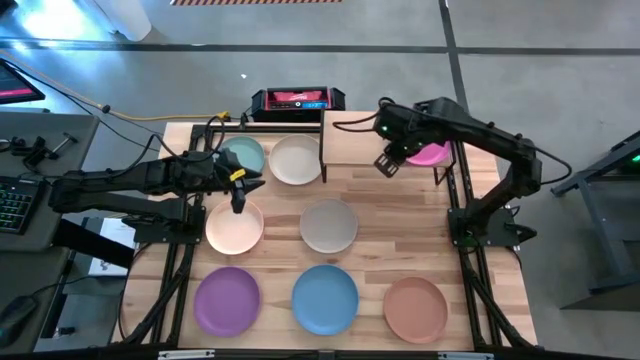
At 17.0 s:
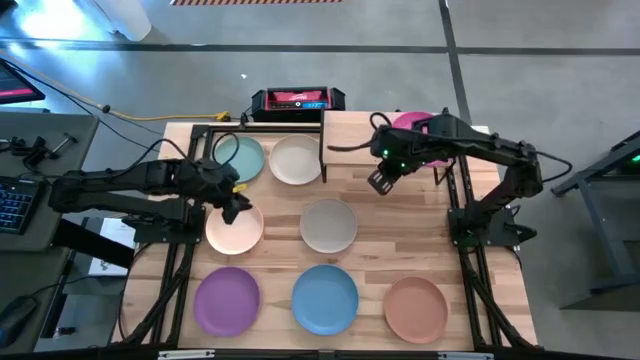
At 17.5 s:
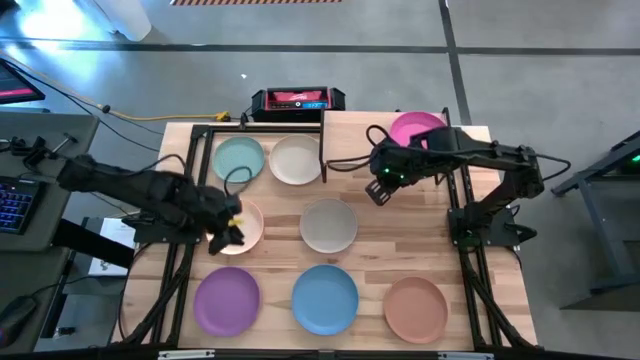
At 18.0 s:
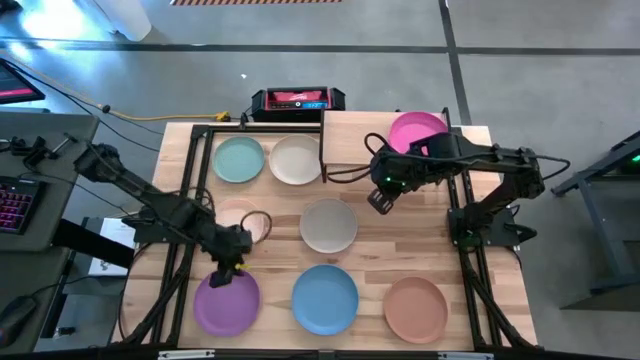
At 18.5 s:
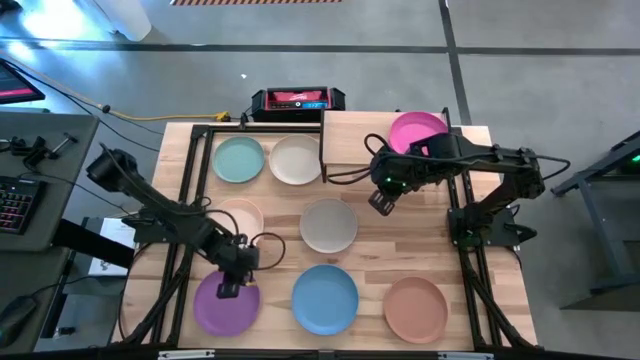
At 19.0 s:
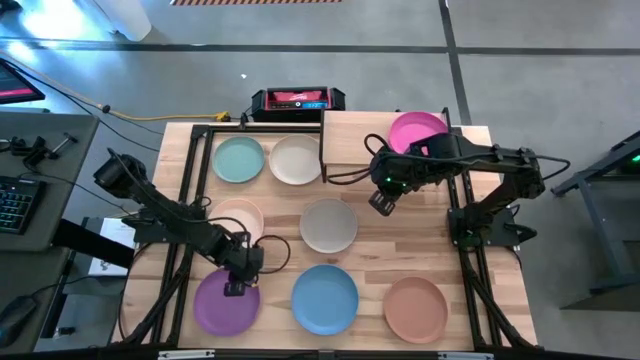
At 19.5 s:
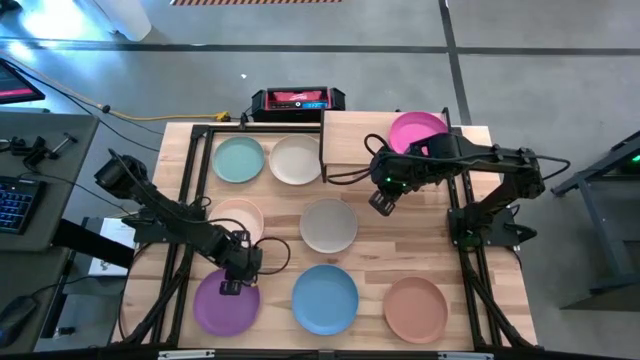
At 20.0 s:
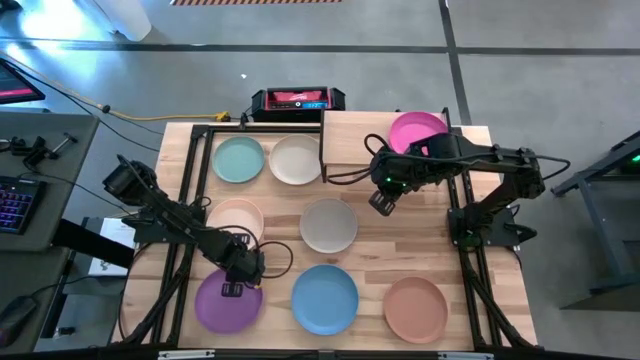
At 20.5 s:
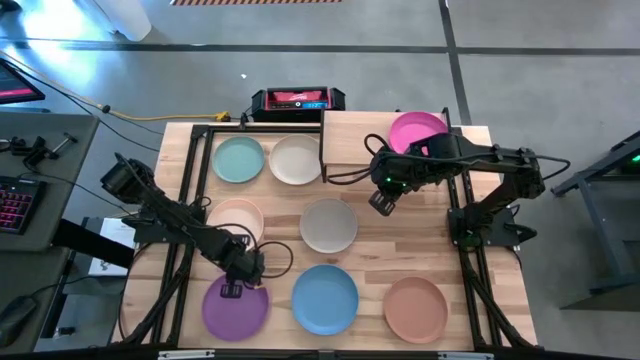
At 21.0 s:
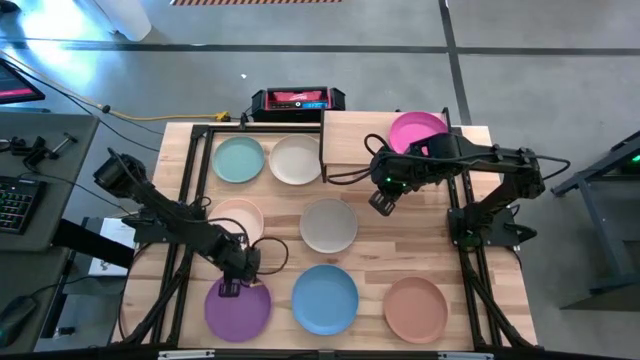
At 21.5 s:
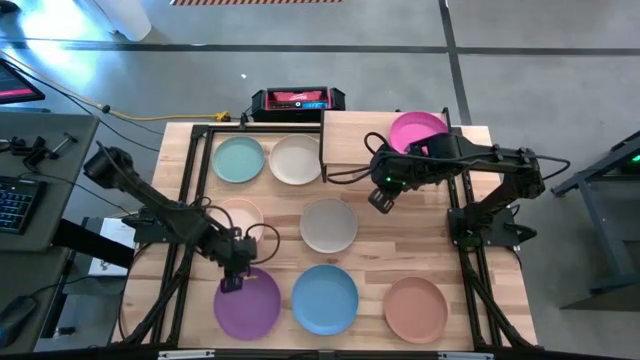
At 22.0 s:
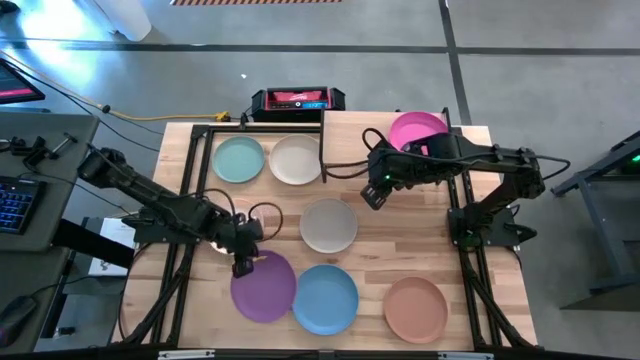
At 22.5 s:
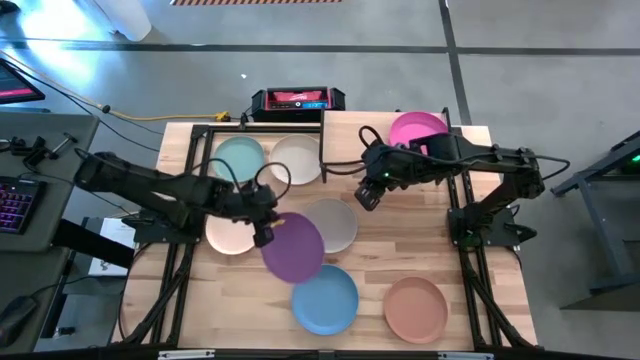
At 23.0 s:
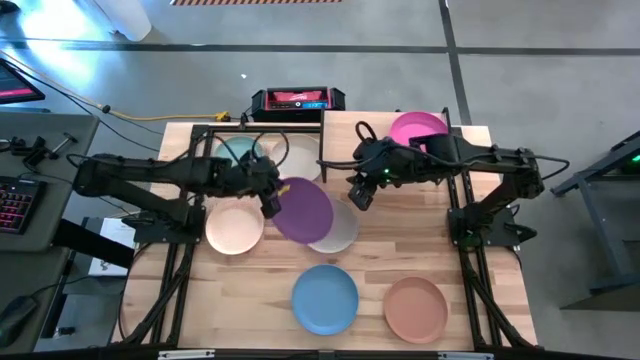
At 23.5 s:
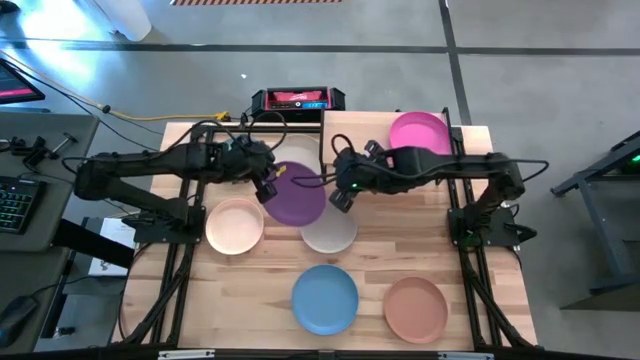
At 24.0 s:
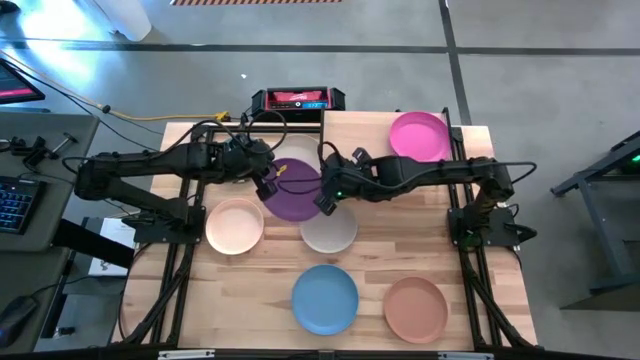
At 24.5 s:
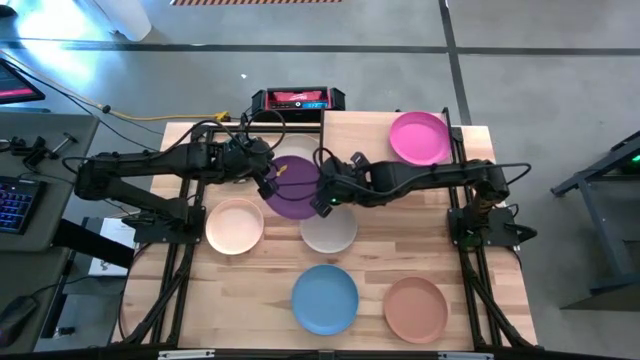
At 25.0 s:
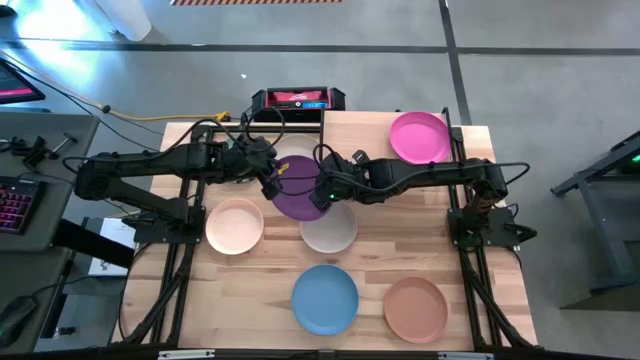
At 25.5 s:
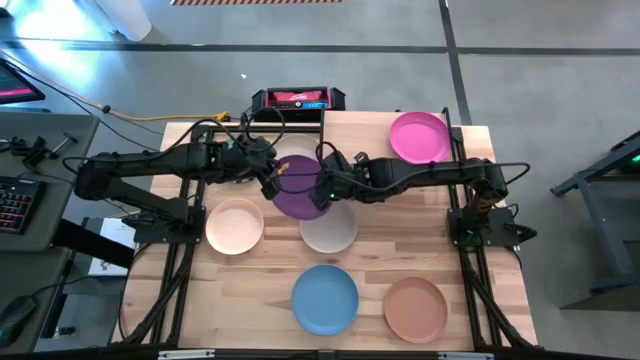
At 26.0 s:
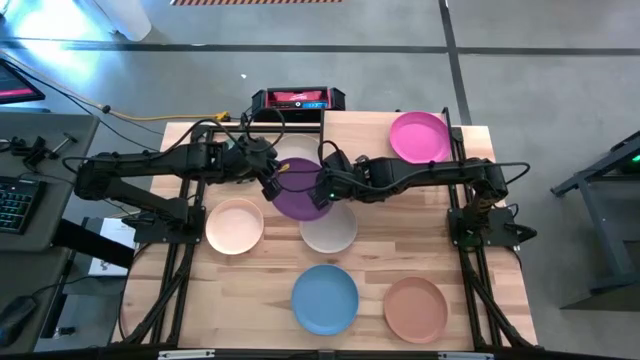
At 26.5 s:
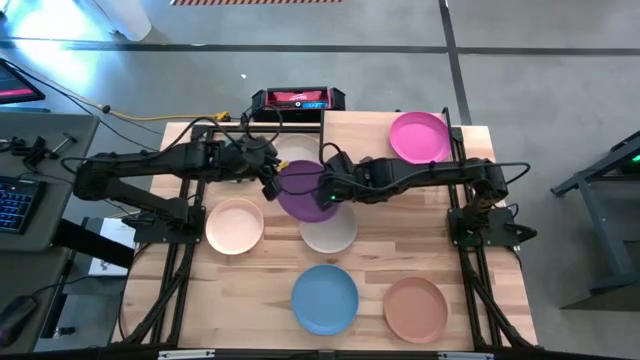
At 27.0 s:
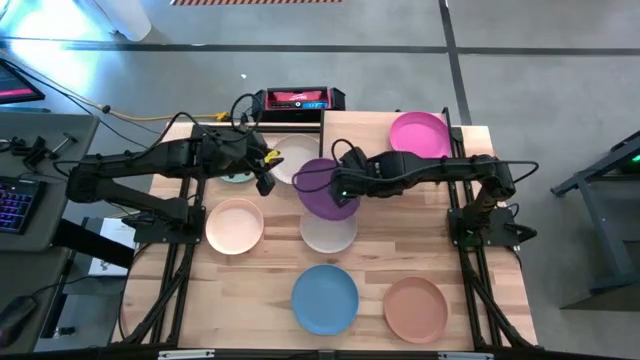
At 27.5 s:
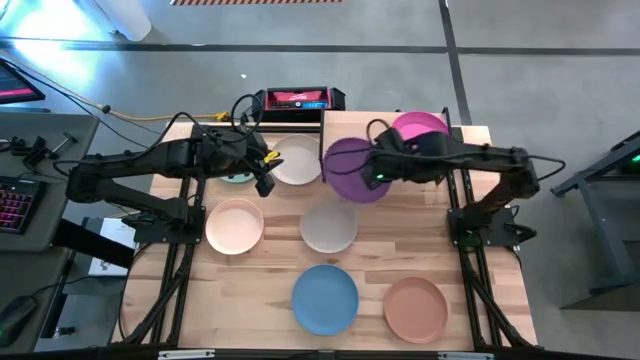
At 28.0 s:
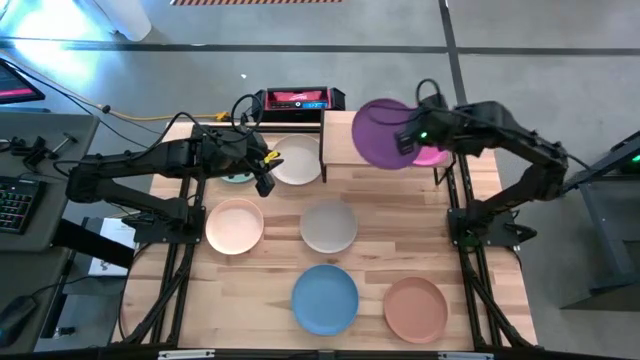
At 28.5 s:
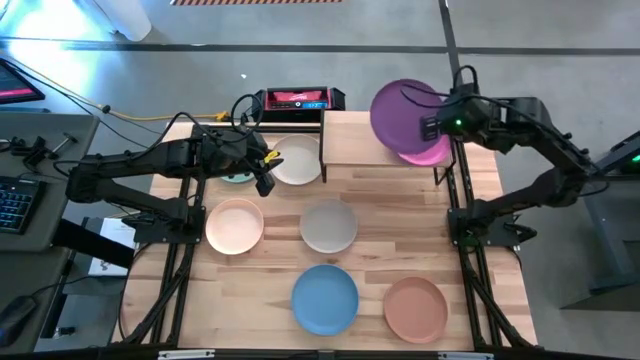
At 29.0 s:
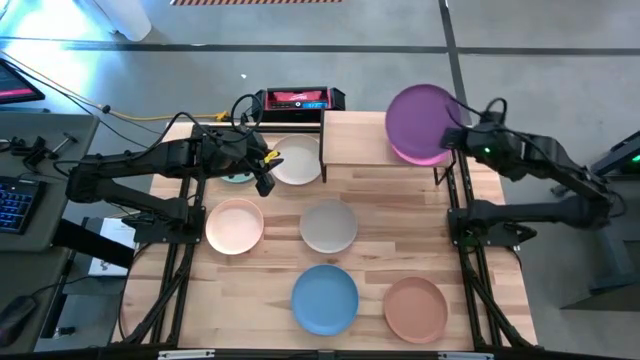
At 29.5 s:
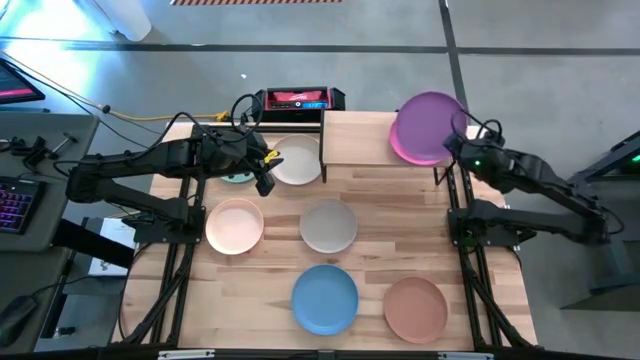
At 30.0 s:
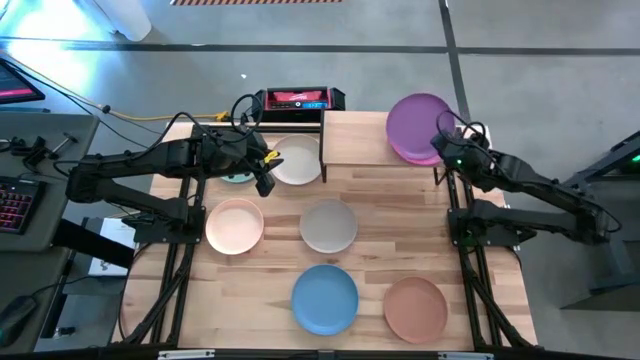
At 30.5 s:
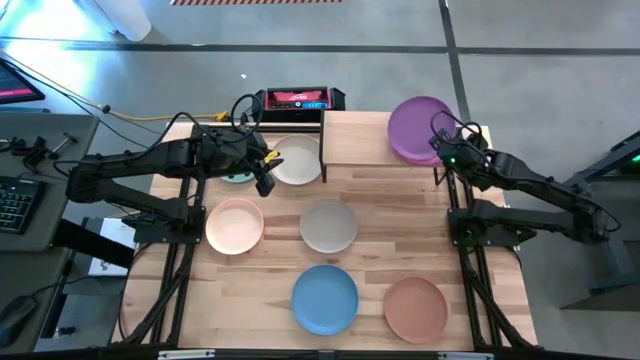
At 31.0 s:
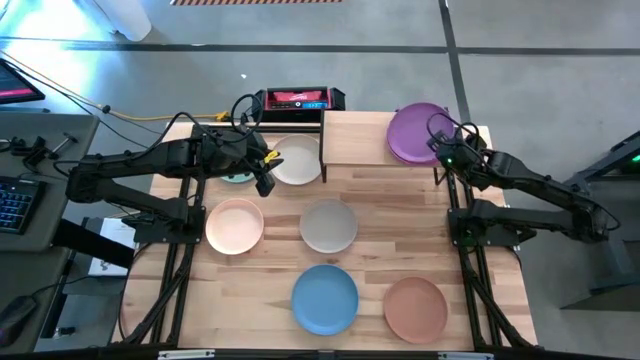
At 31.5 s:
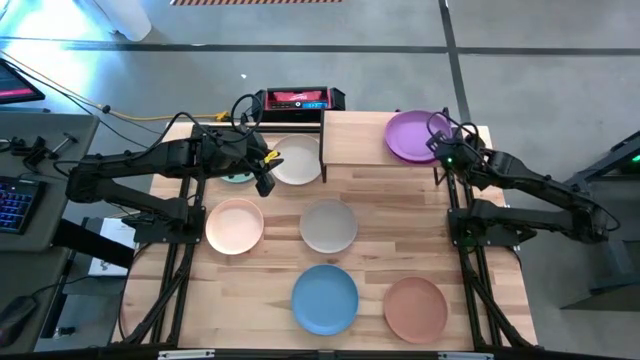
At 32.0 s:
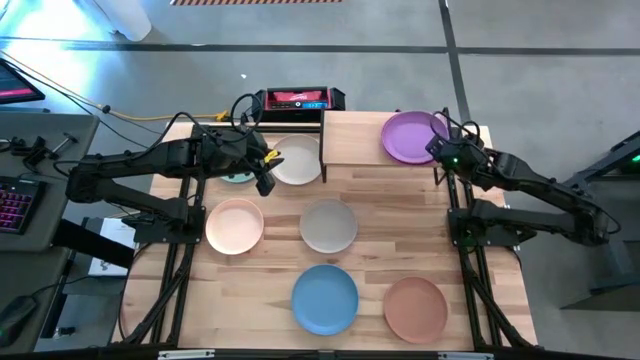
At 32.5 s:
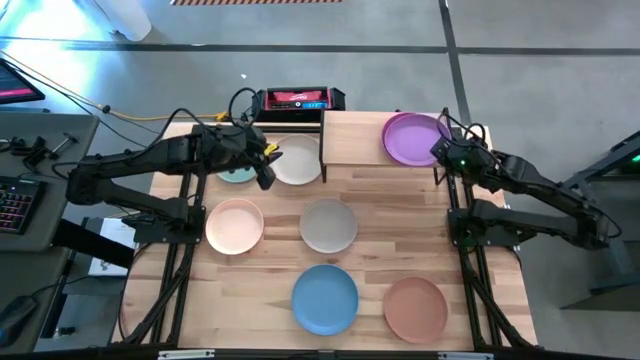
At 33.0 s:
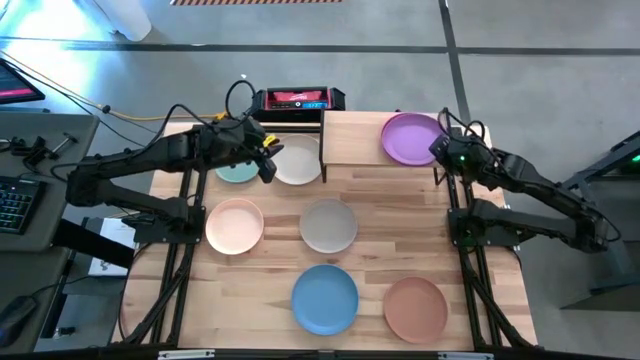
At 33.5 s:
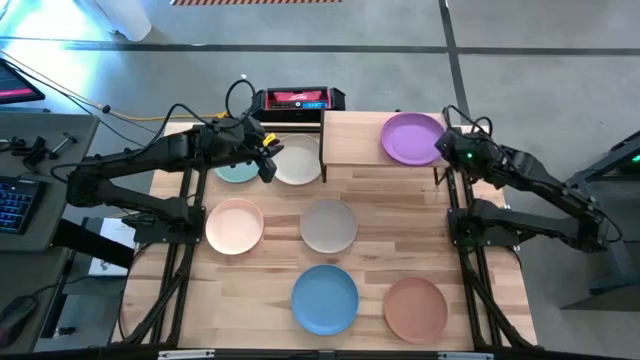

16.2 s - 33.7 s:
Task: Place and stack plates onto a shelf
Stack the purple plate on top of the pink plate on the shelf

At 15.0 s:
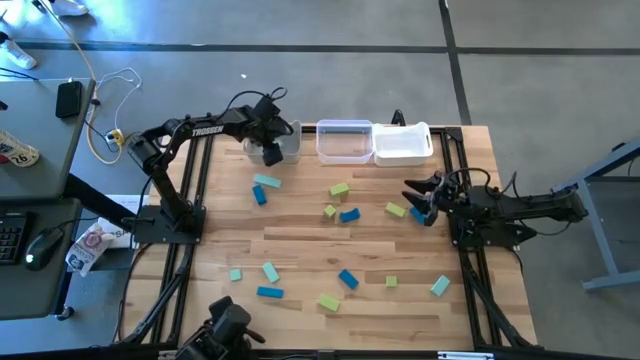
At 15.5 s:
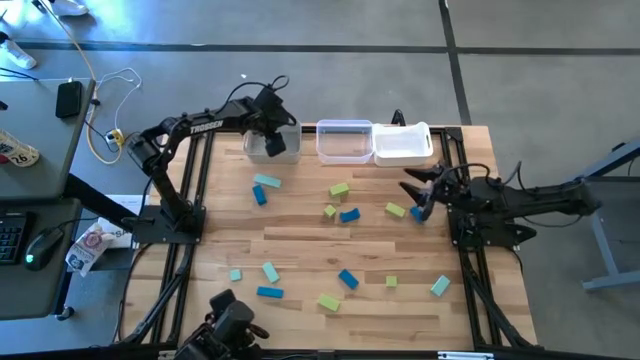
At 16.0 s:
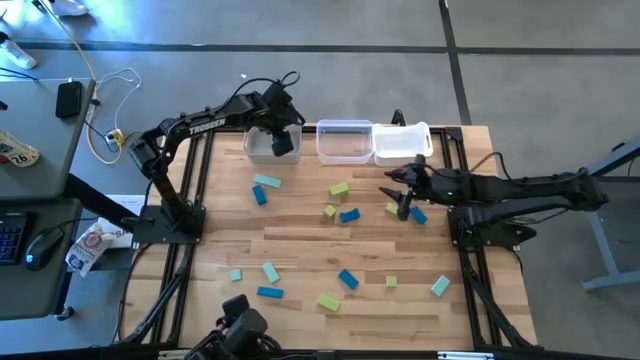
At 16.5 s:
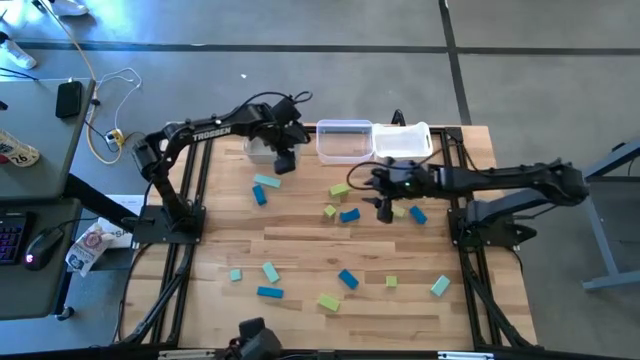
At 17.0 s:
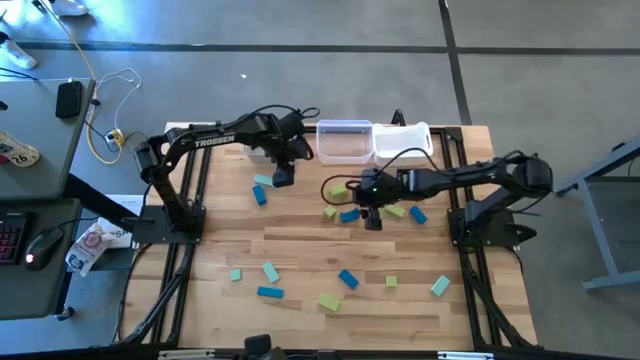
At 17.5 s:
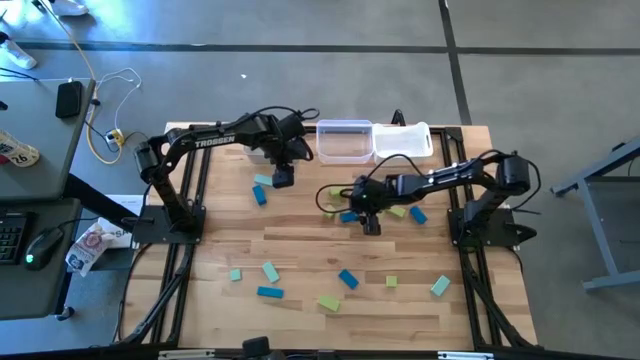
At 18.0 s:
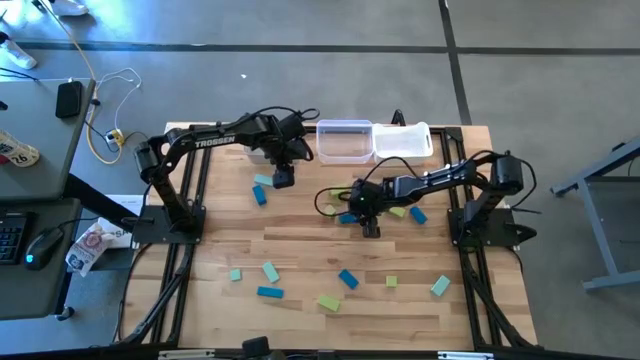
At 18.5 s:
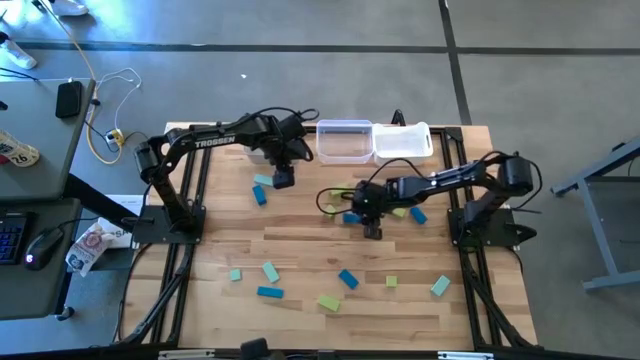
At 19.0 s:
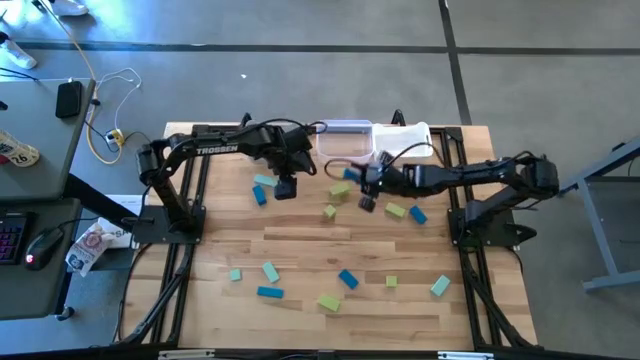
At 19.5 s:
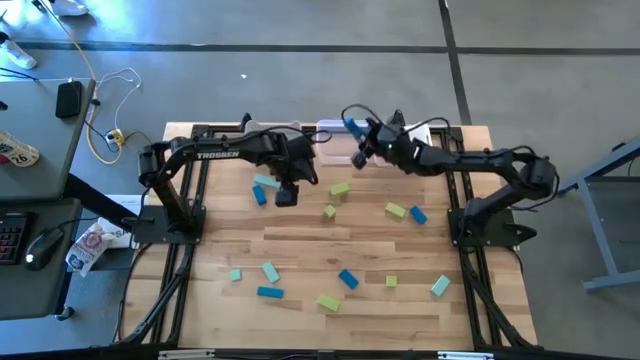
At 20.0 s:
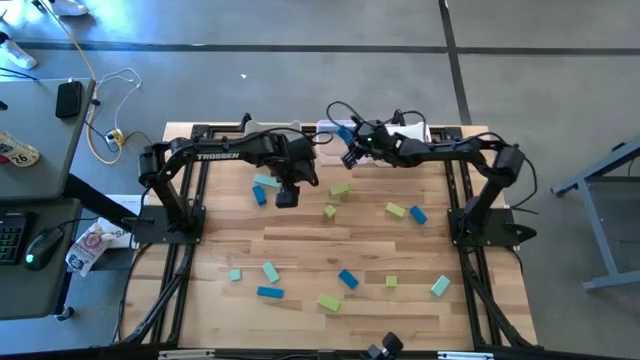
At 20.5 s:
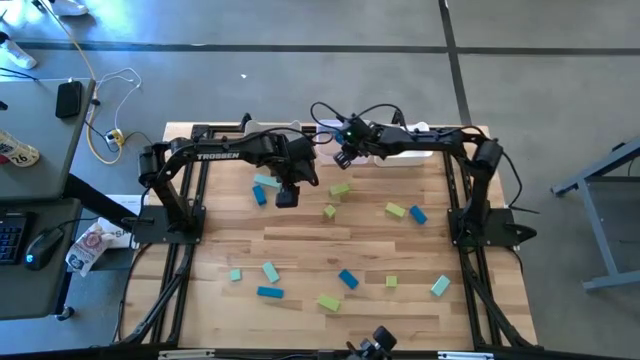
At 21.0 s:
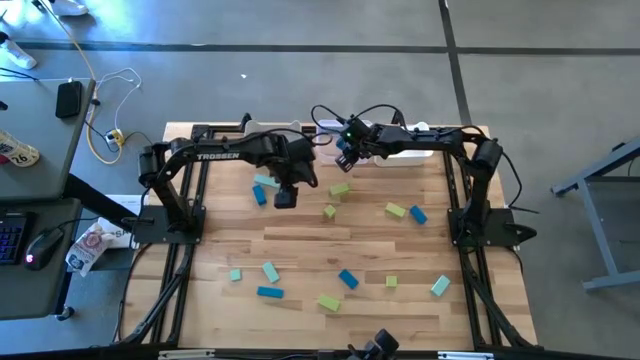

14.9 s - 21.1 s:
Task: Sort & place blocks by color
Put the blue block into the transparent bin
